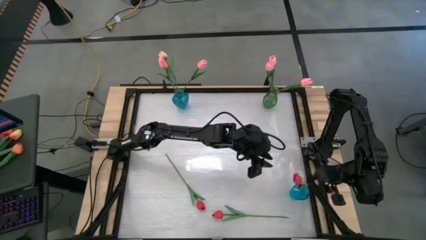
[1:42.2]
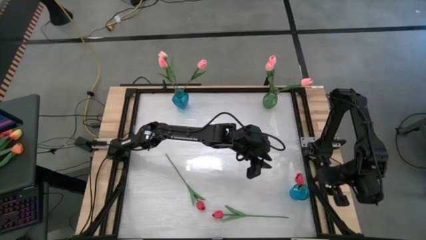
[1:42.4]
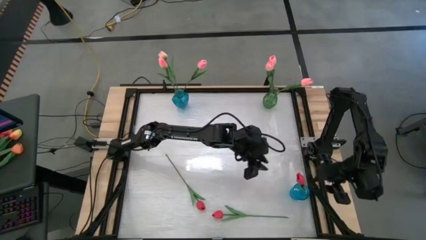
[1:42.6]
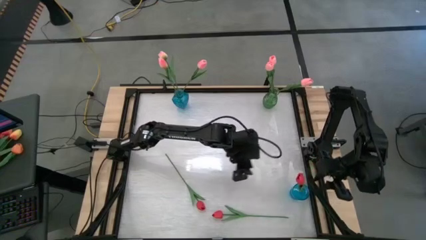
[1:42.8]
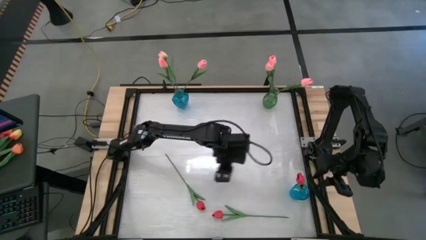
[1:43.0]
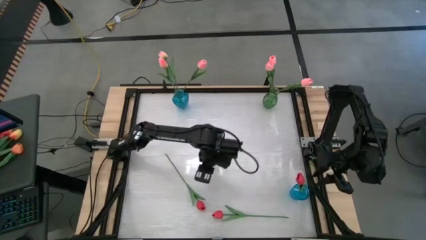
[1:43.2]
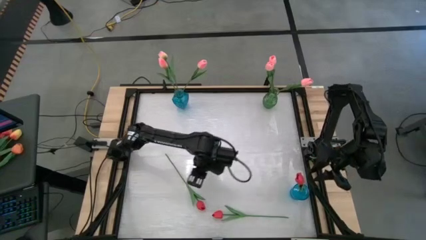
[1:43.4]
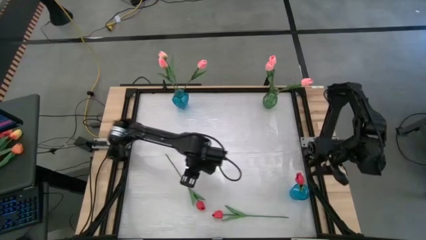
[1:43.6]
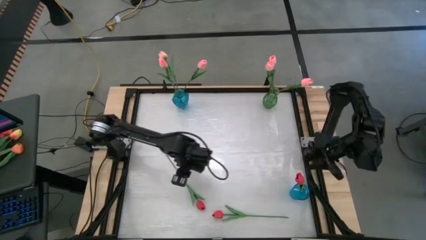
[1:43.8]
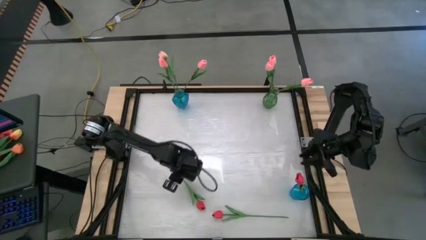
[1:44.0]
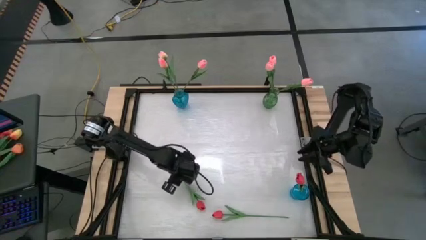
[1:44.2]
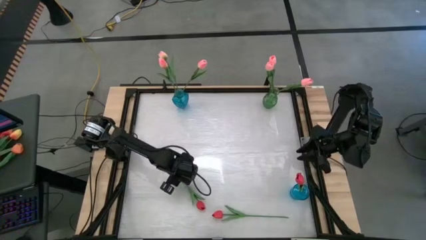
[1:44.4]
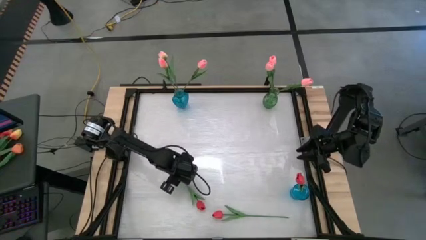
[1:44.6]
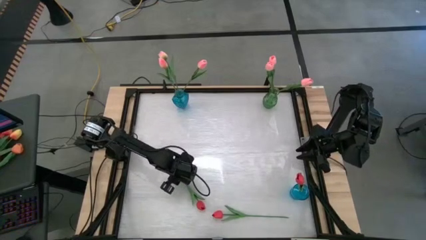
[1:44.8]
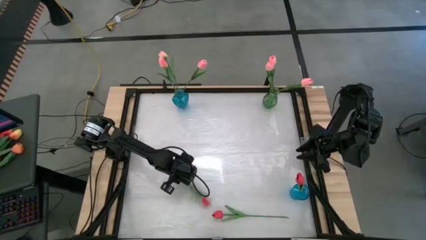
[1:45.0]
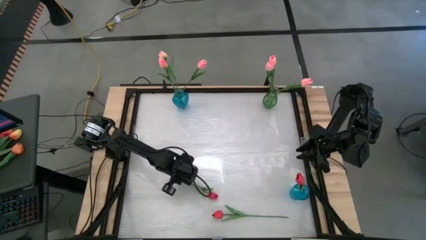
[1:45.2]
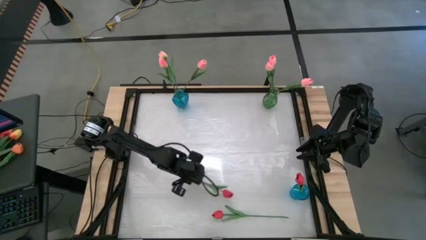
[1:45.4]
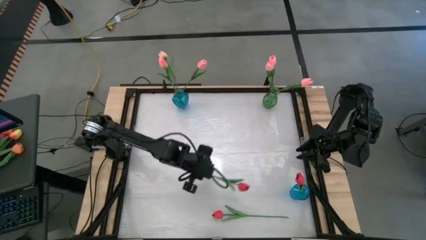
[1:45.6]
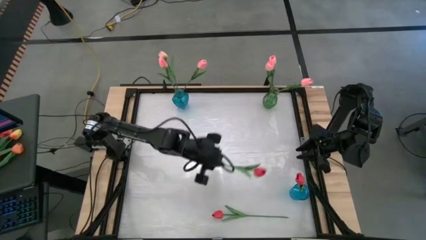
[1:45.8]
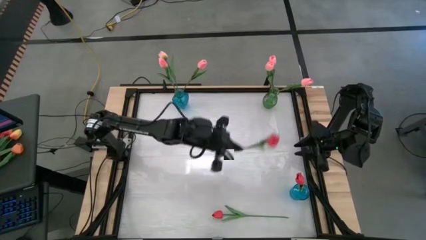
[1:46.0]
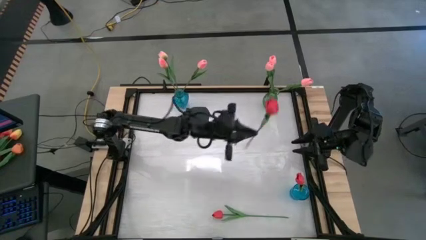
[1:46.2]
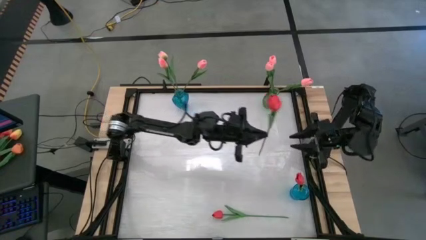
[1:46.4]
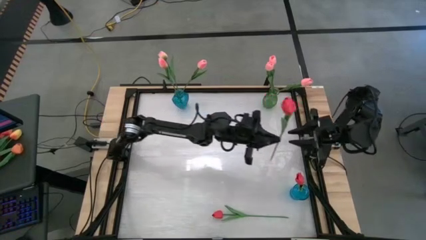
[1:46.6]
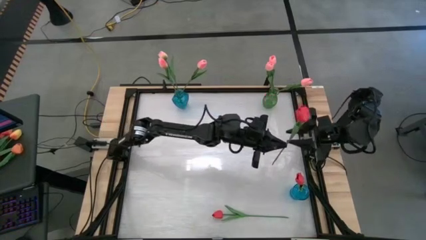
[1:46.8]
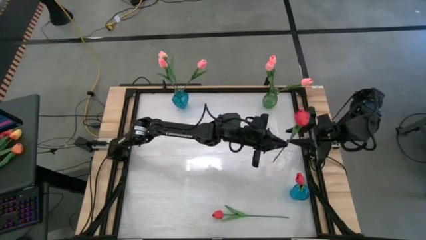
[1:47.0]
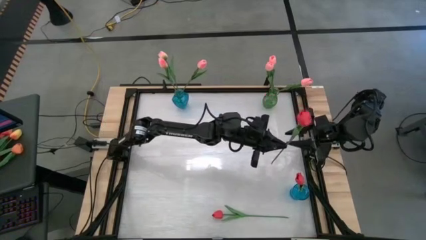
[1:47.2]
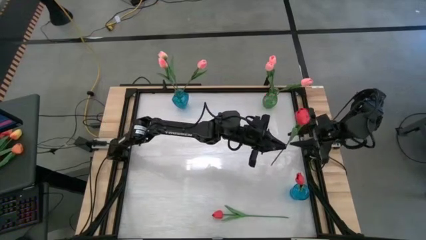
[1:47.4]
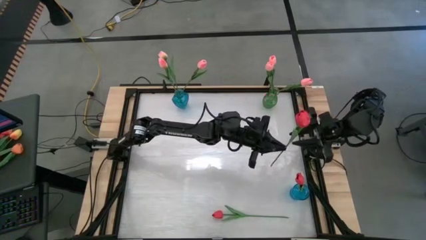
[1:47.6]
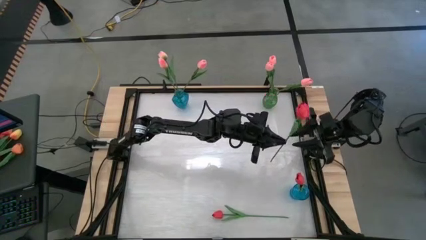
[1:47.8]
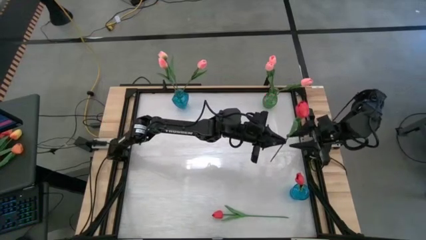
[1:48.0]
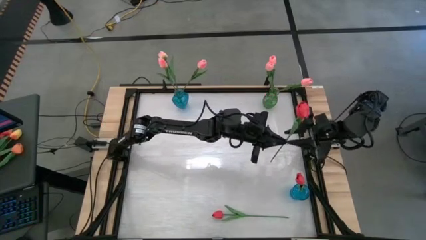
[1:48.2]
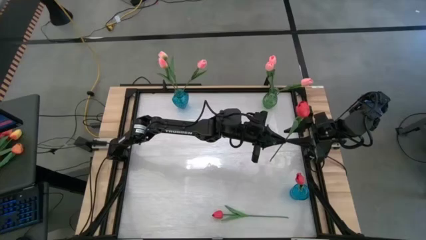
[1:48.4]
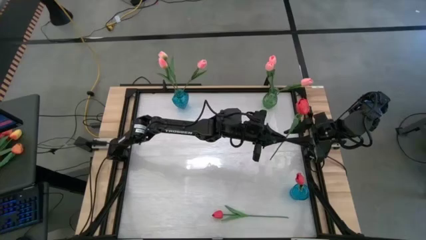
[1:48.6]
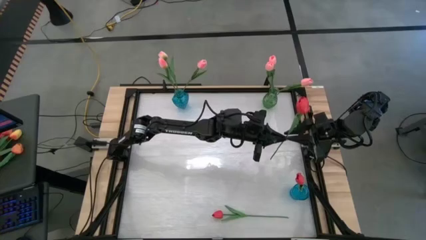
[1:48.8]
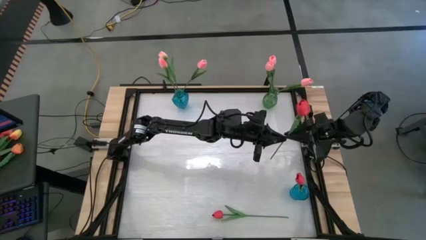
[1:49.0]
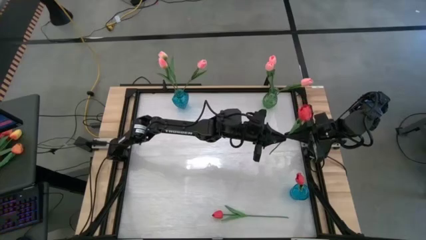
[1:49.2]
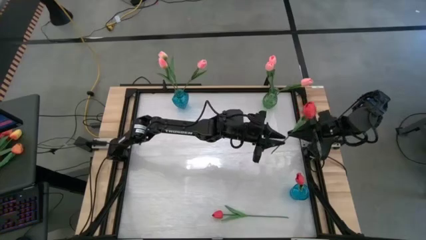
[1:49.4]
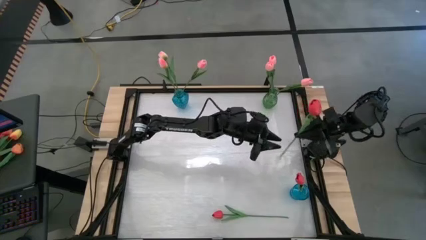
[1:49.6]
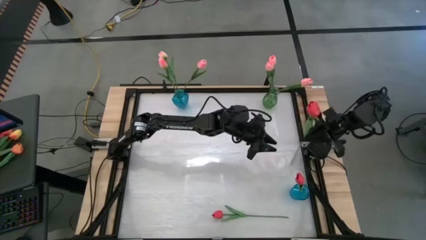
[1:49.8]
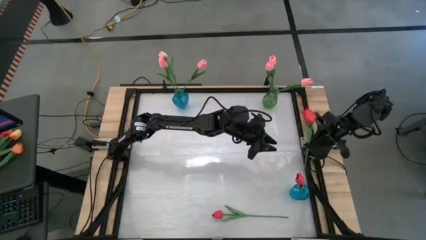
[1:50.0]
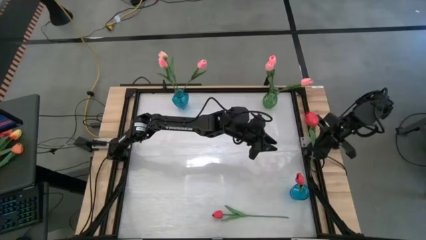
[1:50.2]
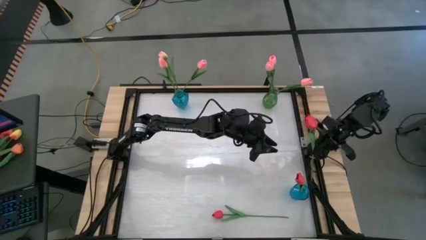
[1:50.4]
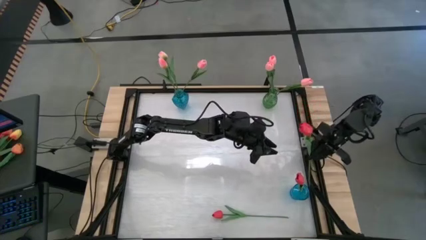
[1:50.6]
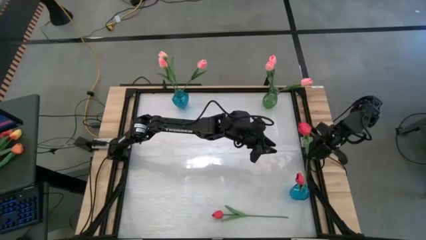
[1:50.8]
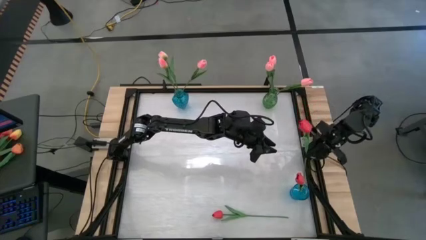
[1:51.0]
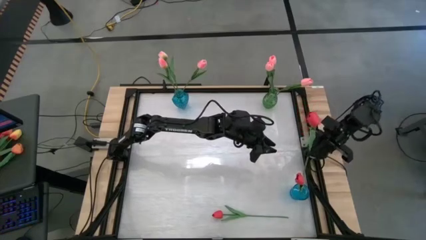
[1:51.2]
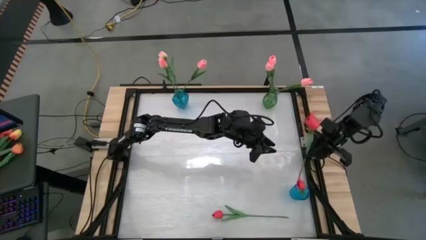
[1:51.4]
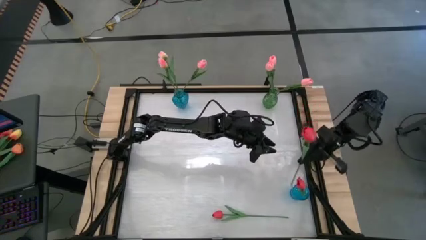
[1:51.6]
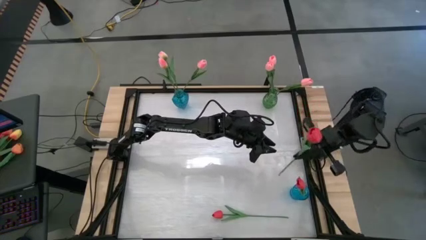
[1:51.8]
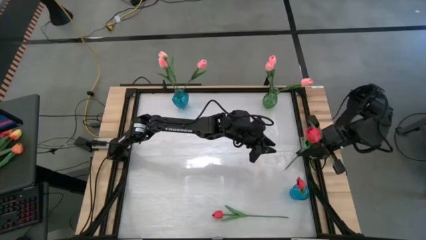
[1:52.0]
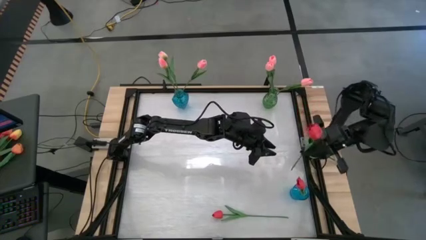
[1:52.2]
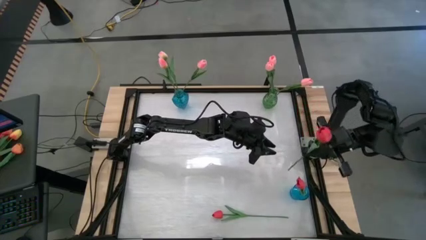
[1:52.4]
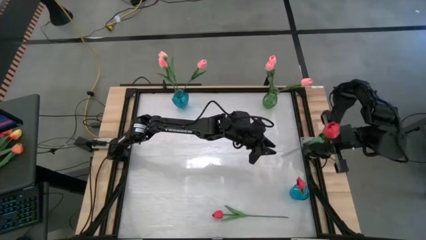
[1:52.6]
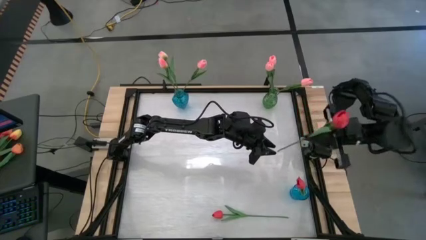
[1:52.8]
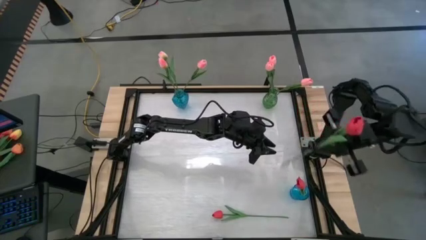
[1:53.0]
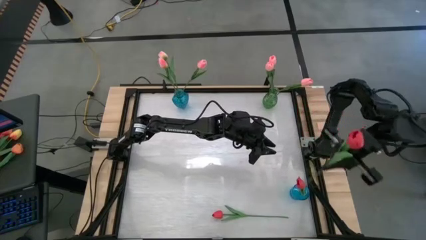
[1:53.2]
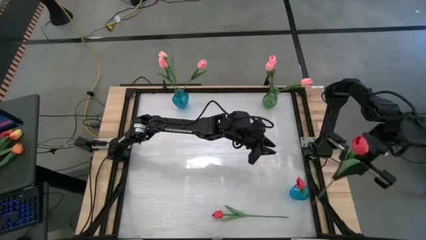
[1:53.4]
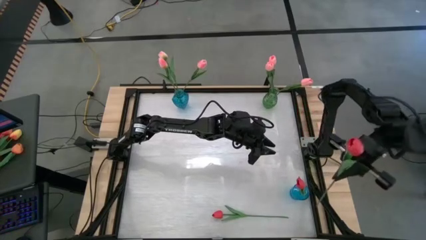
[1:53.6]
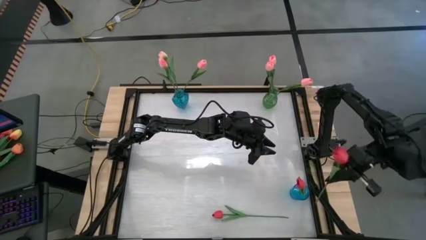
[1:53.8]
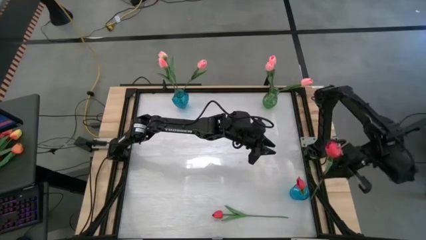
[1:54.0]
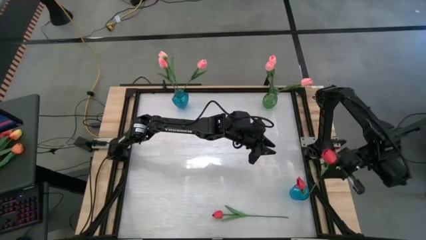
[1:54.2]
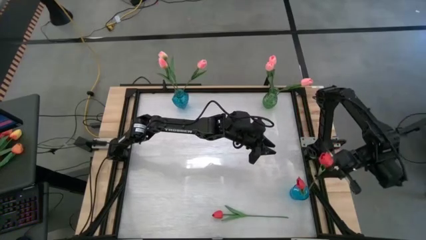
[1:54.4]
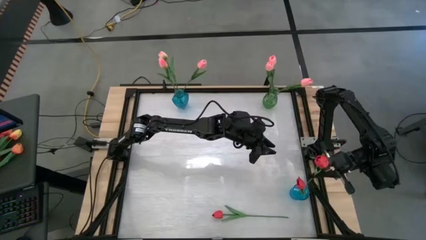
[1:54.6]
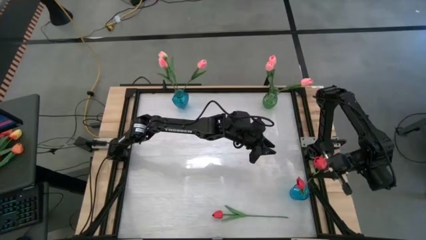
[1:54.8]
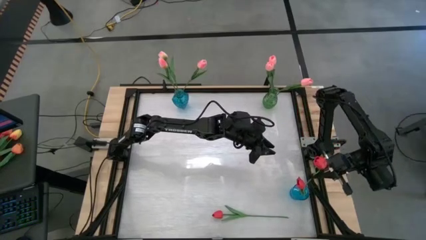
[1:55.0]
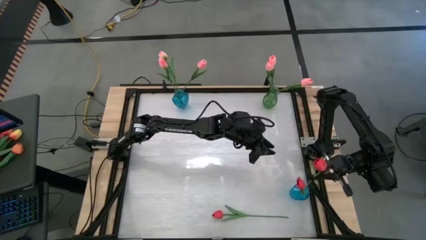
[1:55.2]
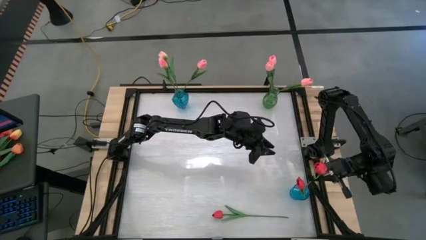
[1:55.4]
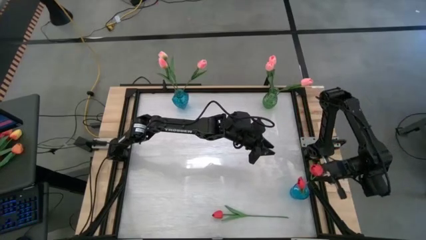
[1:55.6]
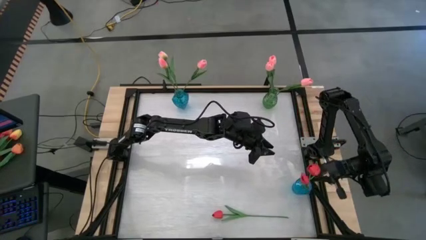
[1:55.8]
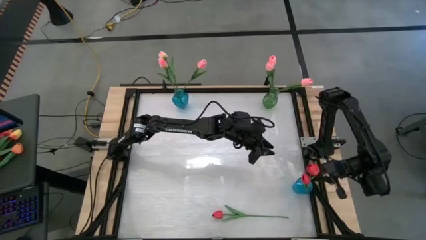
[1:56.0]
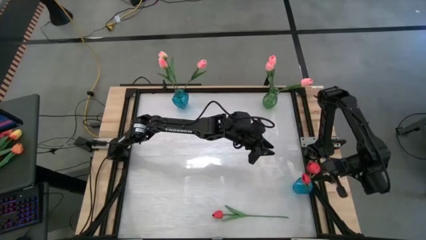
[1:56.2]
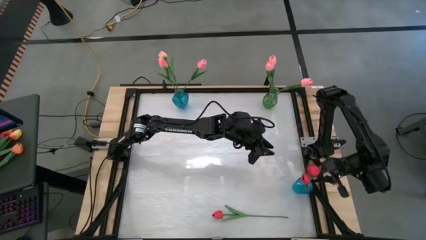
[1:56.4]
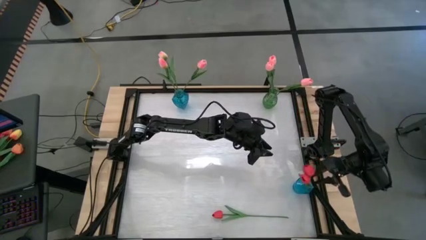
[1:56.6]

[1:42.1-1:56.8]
Task: Sort flowers into vase by color
Put the left red tulip into the right blue vase
